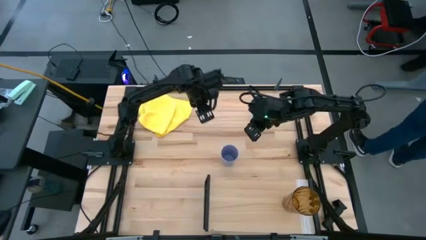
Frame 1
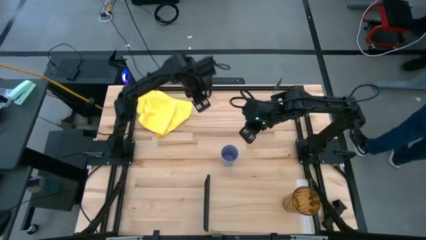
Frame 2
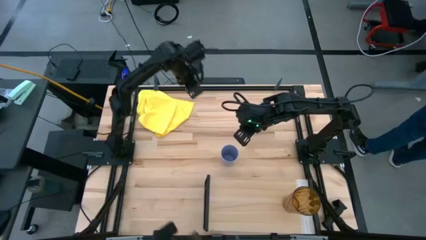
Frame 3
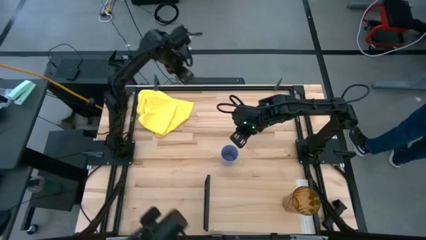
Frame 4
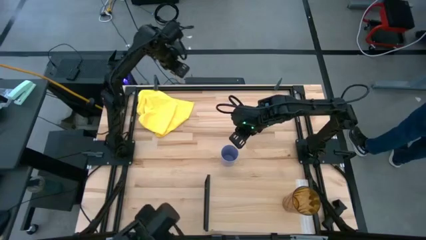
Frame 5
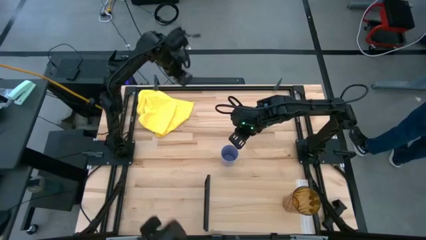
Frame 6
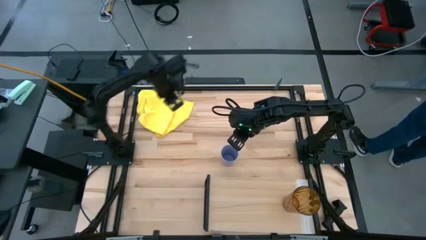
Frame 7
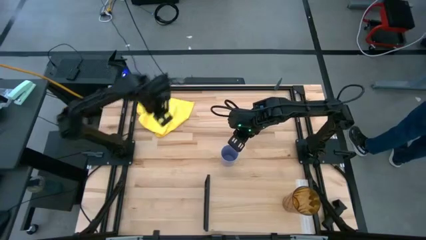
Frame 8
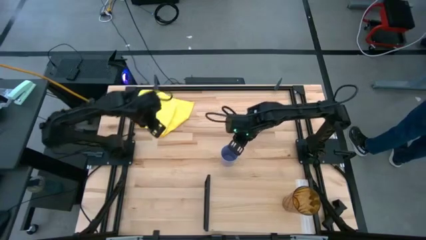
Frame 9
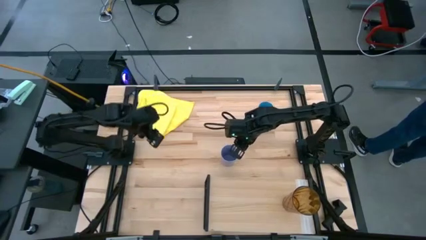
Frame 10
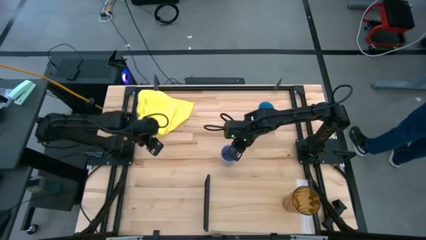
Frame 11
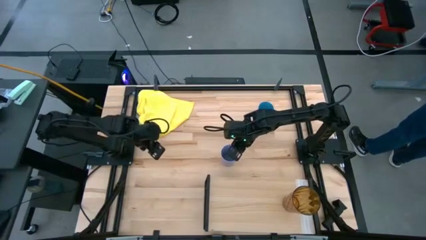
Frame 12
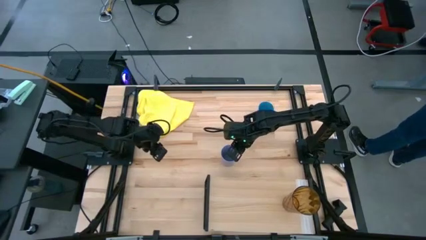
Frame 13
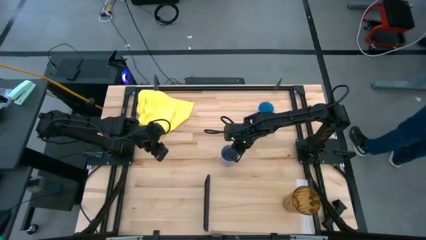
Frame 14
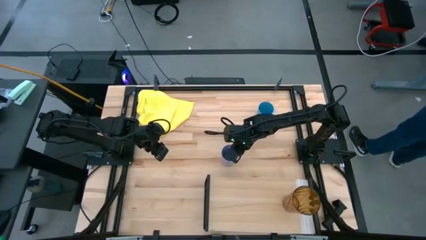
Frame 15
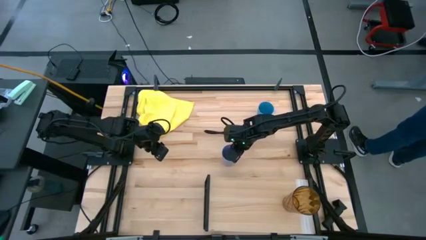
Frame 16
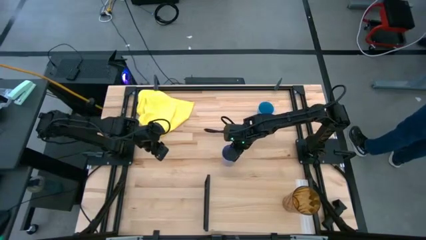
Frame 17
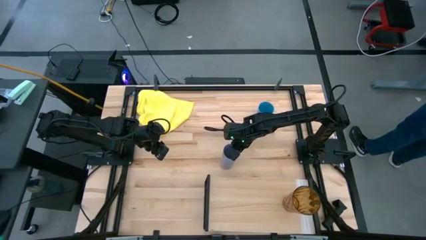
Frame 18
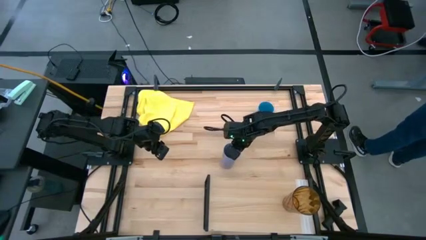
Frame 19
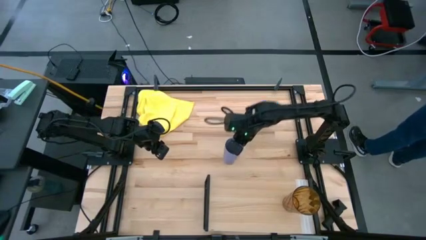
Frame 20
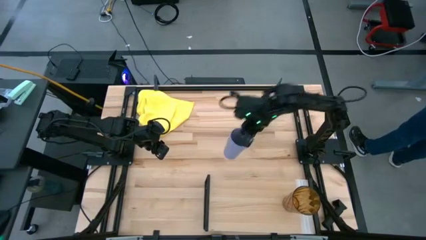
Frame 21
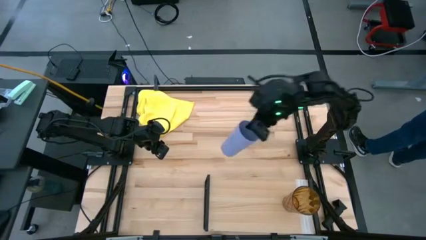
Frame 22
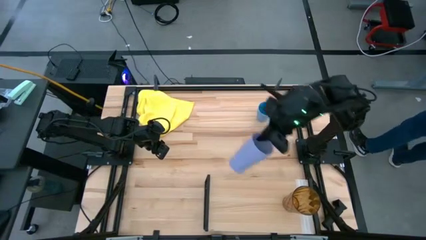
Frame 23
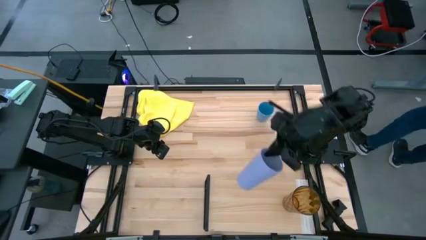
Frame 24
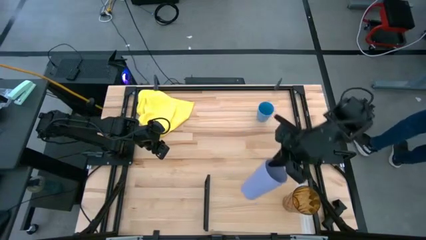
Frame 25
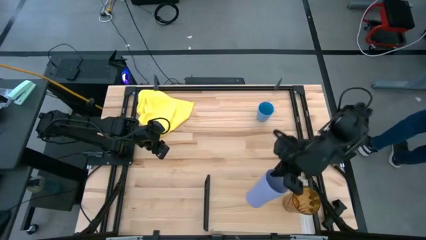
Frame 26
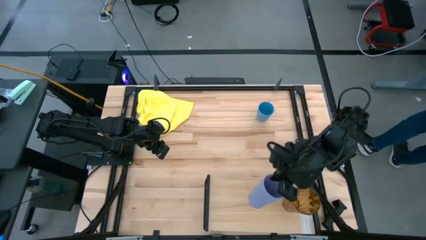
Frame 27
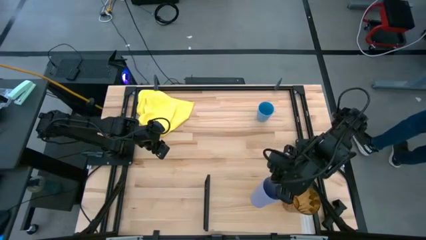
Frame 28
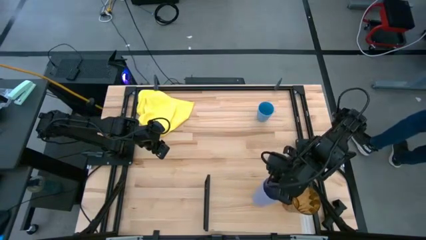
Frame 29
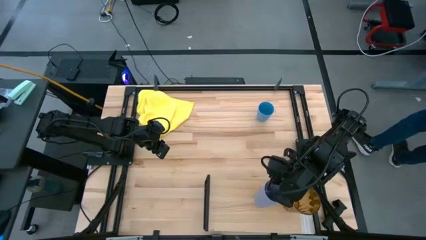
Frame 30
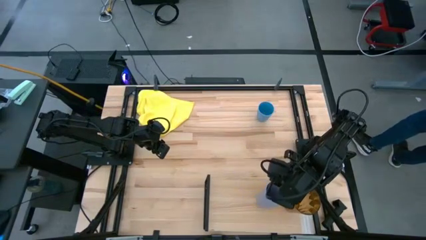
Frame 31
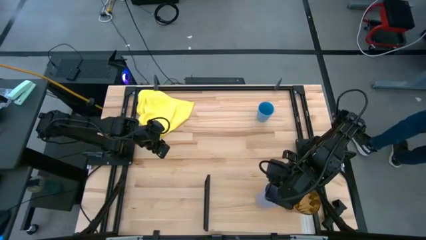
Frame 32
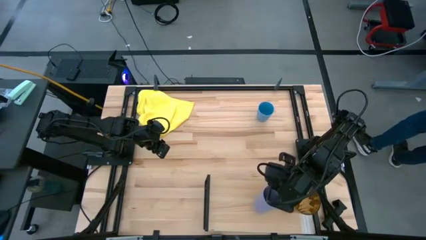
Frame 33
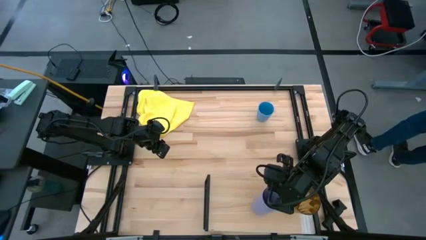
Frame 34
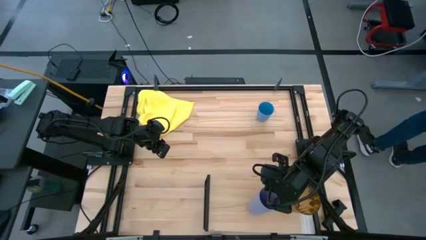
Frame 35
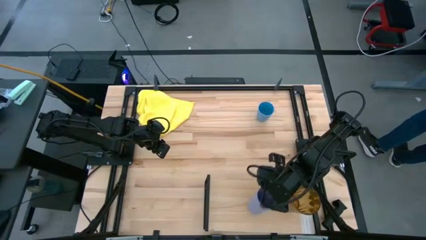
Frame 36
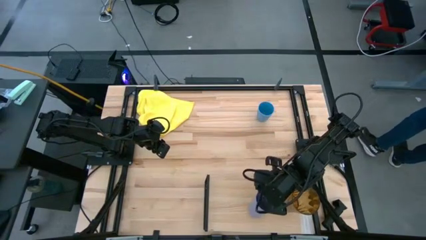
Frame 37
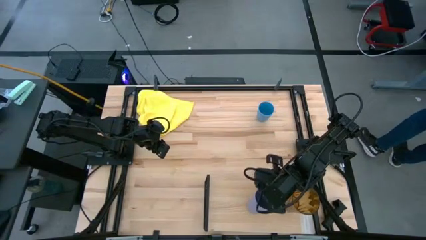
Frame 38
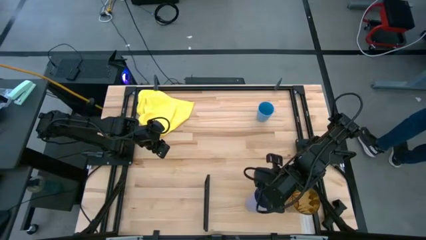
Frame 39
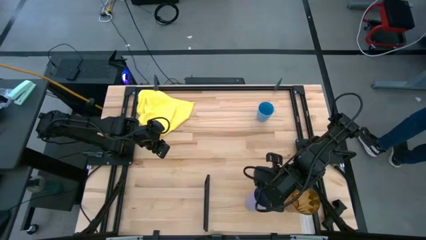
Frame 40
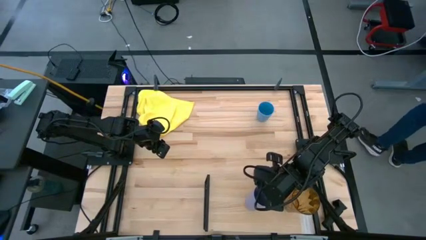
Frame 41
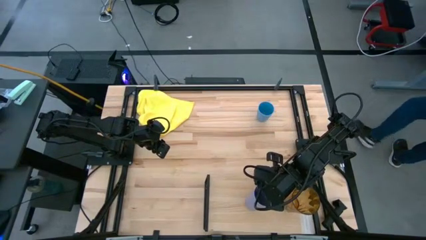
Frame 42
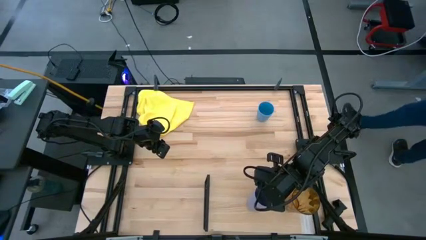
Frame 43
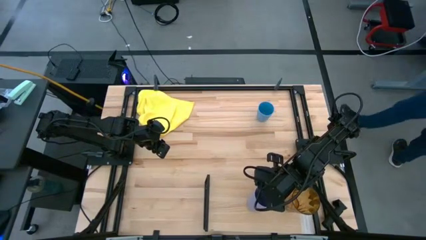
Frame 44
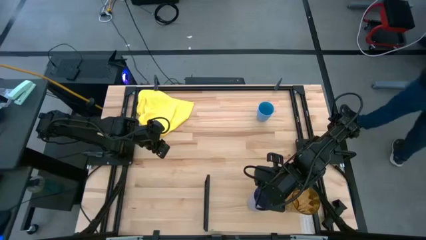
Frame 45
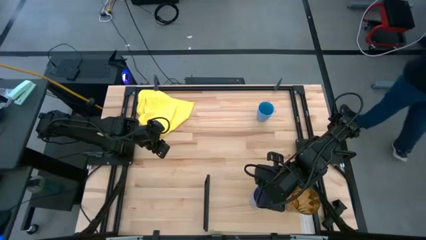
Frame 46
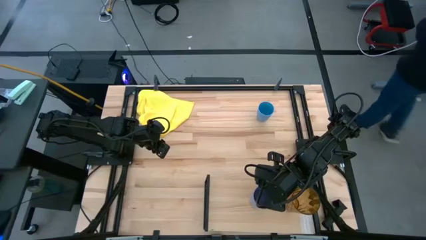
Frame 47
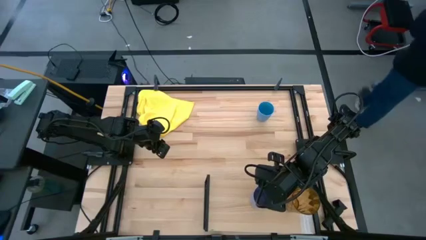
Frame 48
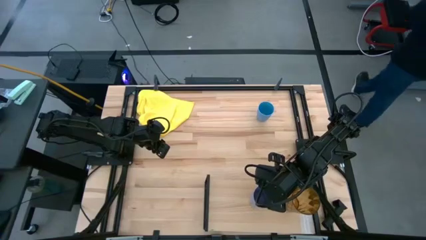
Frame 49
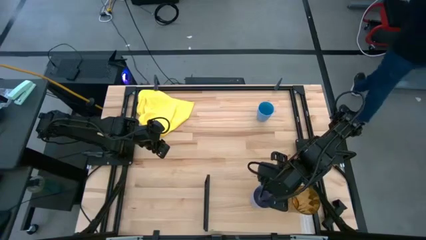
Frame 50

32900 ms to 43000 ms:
Task: Stack small to large cups/mugs on shelf
Put the purple cup on the shelf

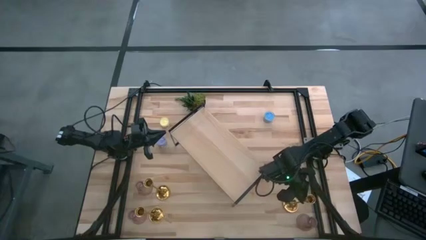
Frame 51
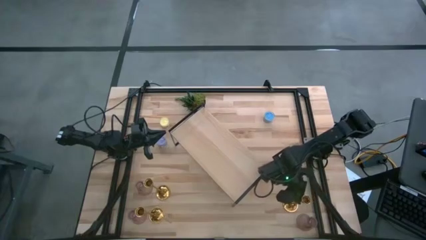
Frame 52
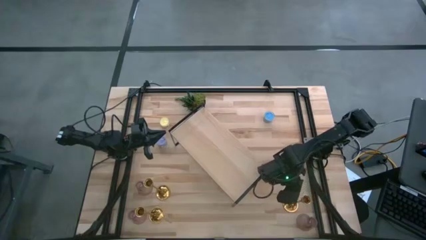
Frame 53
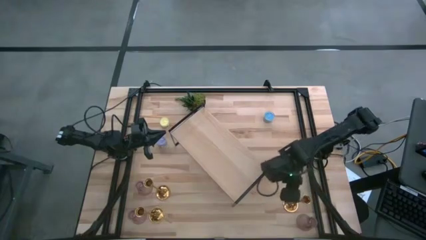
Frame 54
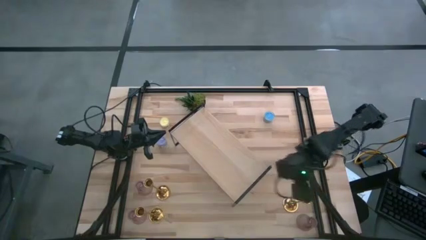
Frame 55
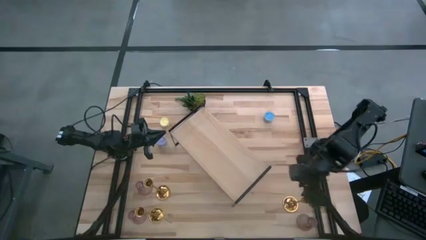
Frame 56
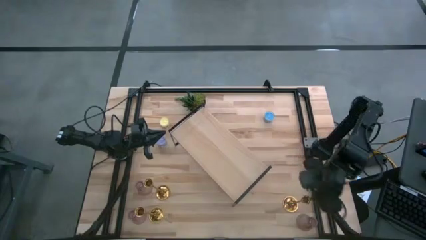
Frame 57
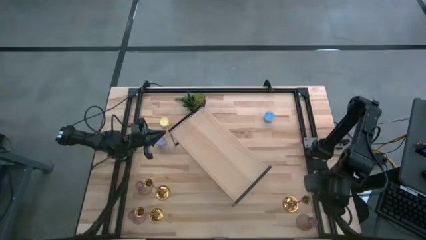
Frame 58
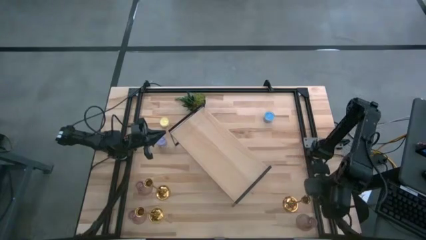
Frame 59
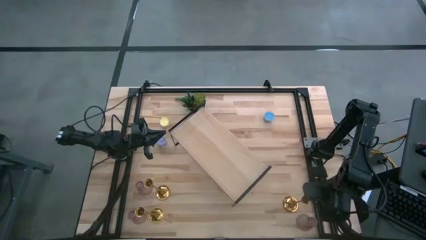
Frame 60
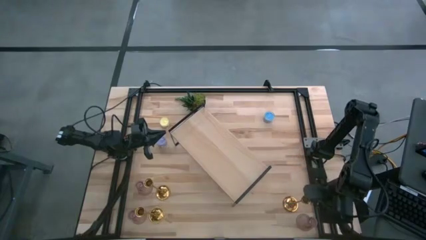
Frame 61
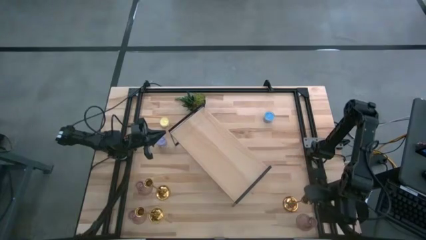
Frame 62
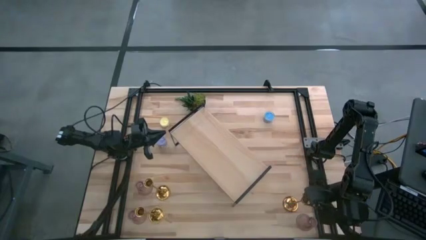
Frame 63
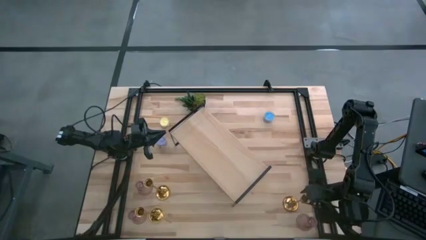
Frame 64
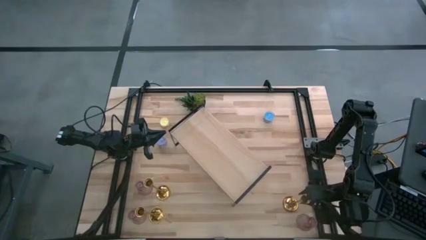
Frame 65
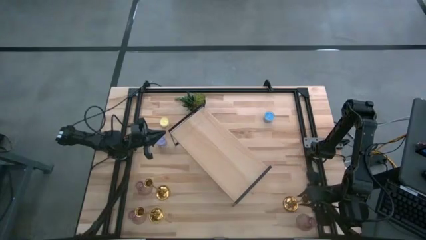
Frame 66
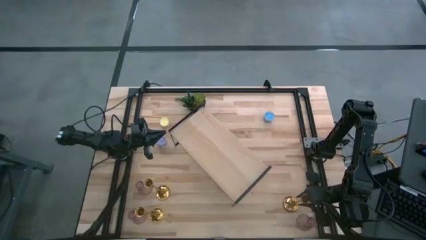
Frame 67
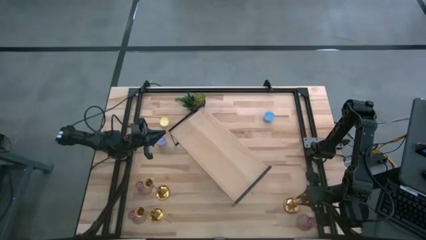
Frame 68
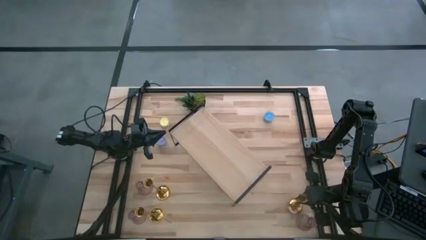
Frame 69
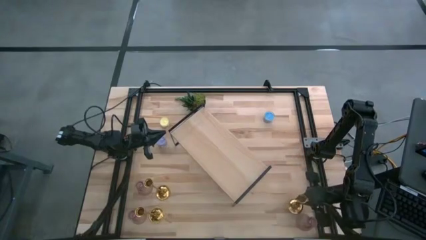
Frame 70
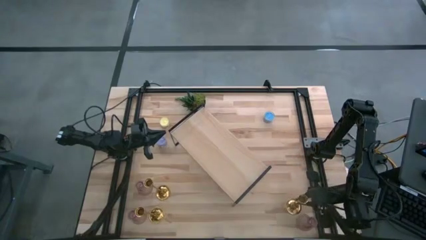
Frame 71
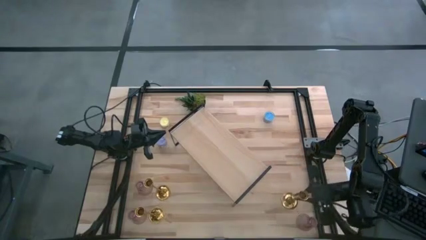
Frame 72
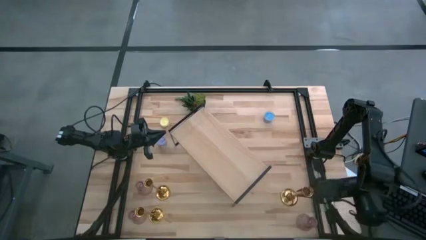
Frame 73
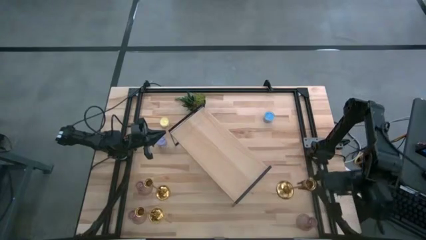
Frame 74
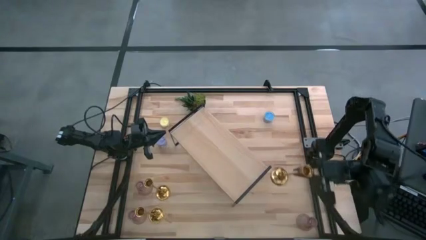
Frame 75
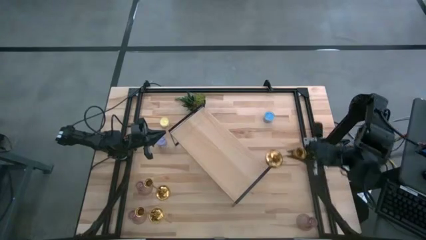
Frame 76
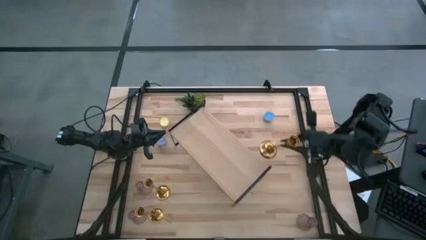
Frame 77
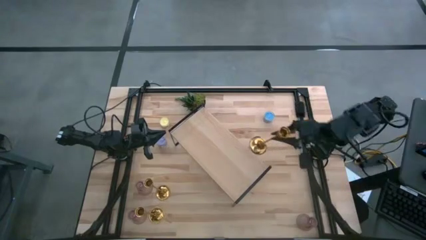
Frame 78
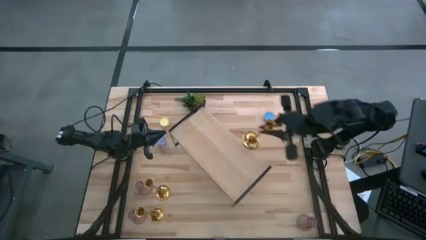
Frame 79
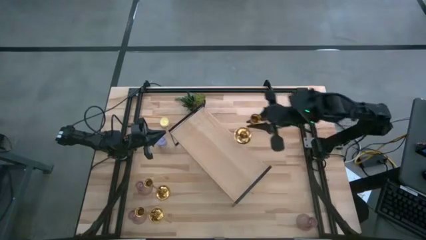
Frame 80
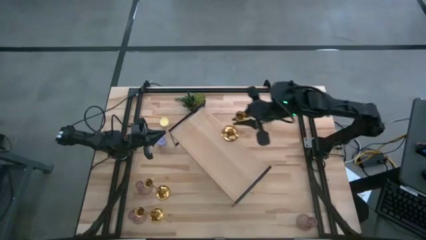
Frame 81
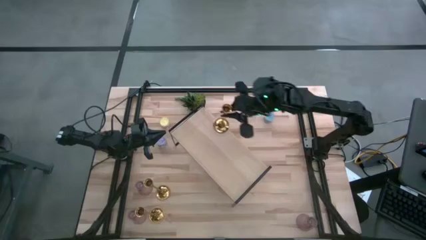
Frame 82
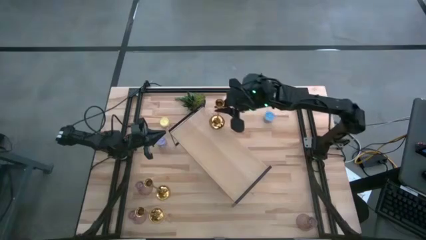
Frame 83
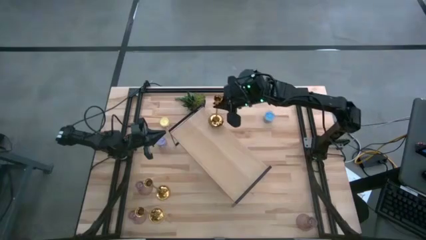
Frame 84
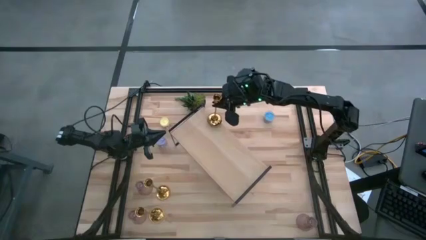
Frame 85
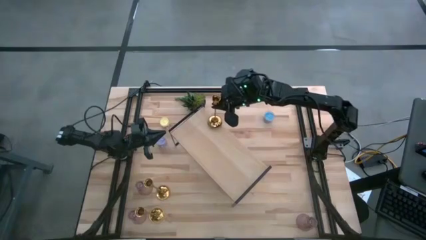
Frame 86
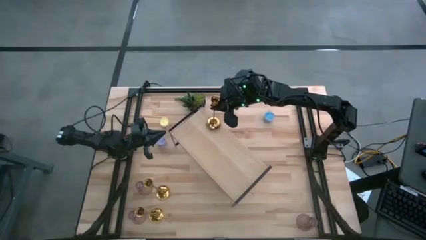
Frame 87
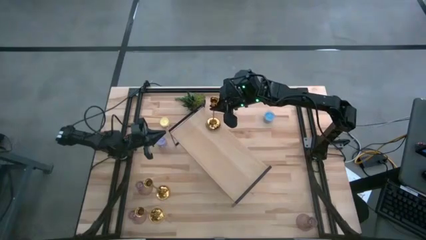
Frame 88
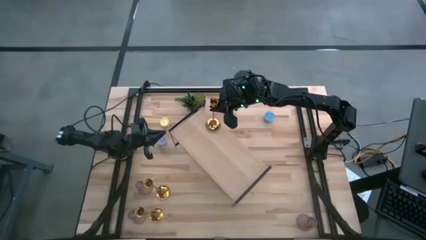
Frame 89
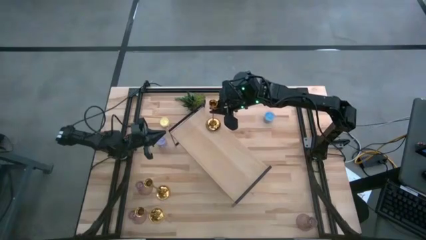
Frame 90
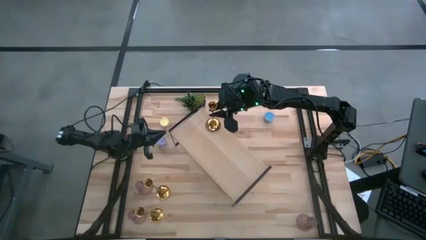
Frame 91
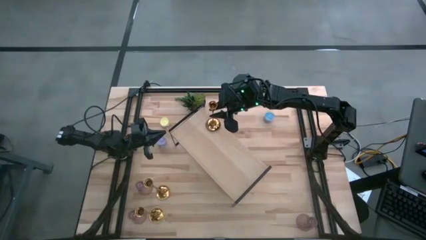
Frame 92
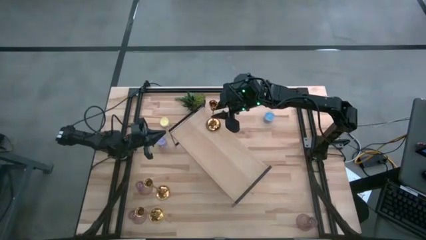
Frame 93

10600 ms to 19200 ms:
Task: Pick & Place candle stick holders
Put the top right gold candle holder on the shelf
